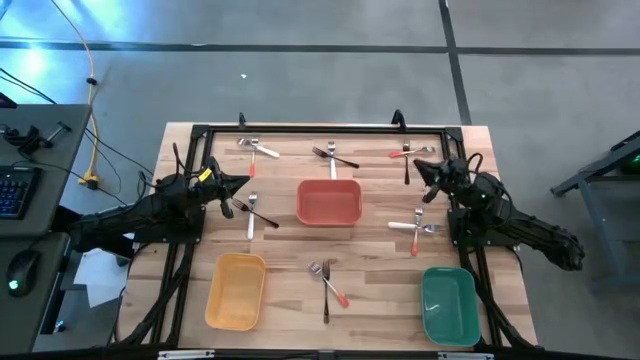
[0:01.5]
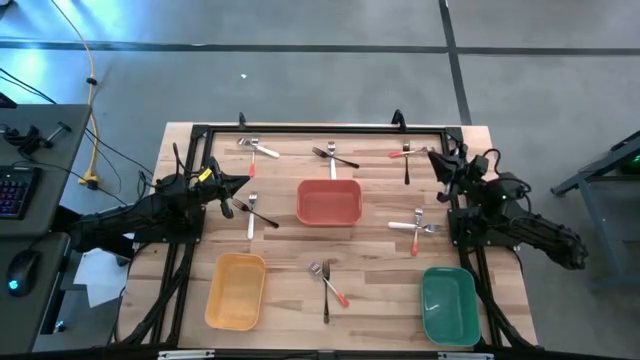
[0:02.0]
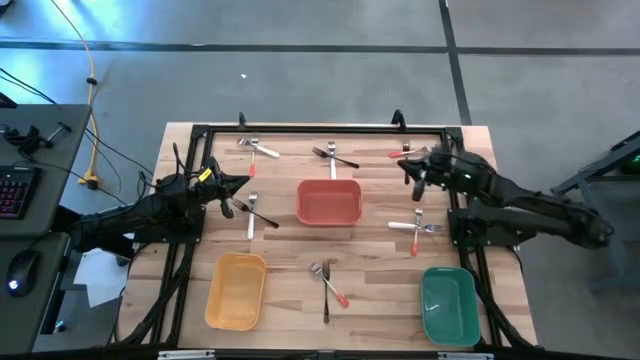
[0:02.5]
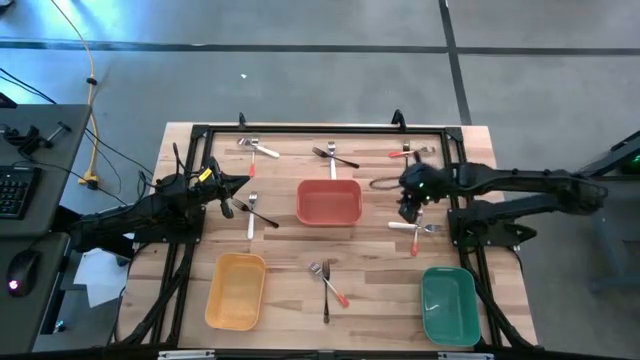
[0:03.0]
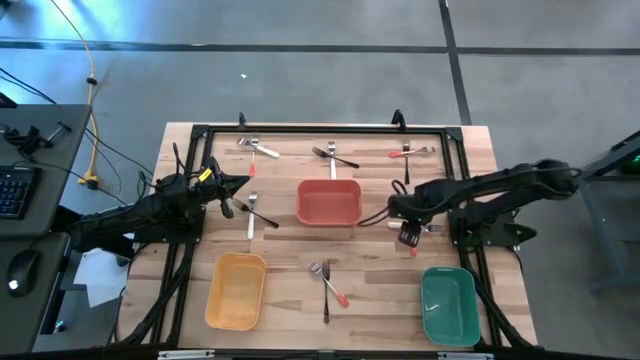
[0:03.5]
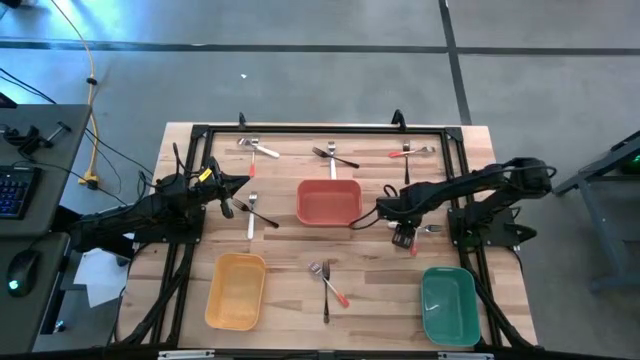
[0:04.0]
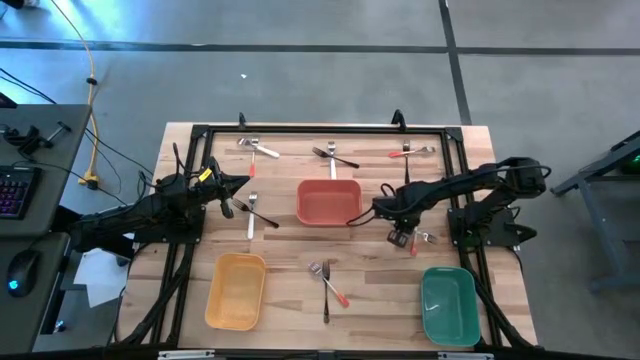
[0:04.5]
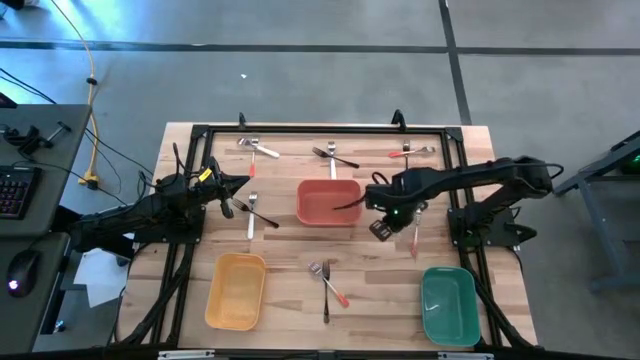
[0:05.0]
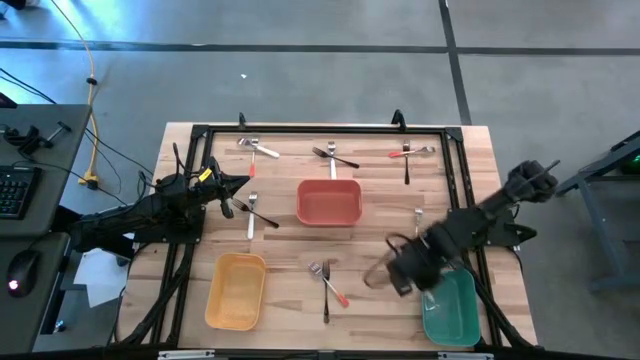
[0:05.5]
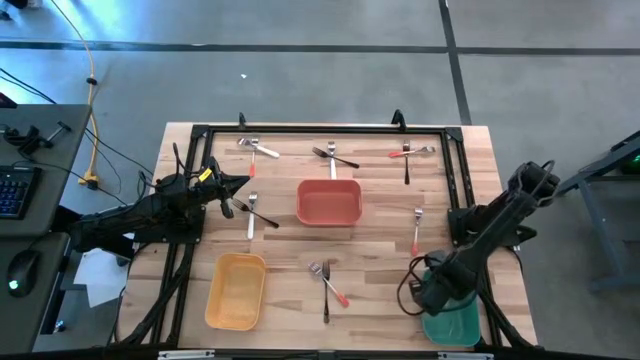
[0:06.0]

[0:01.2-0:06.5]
Task: Sort silverware by color (type)
Put the bottom right white fork into the green bin

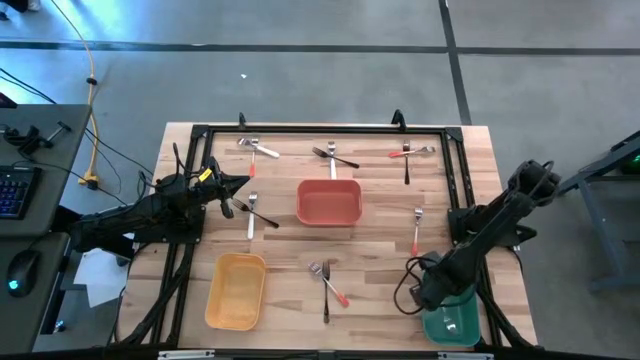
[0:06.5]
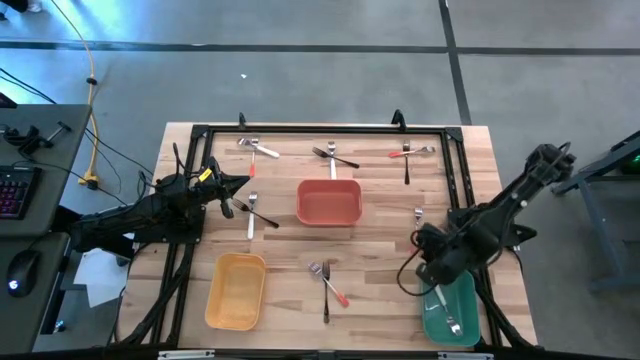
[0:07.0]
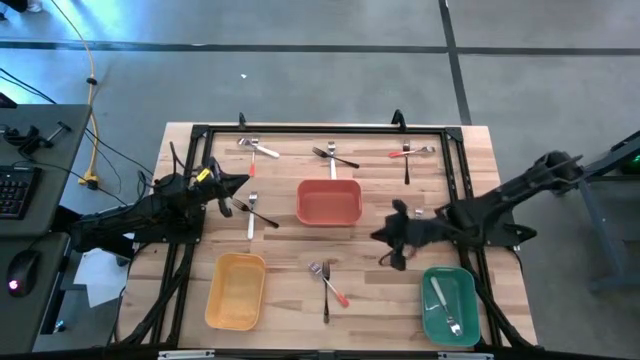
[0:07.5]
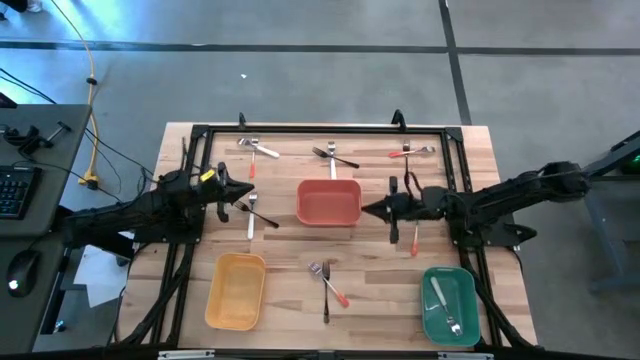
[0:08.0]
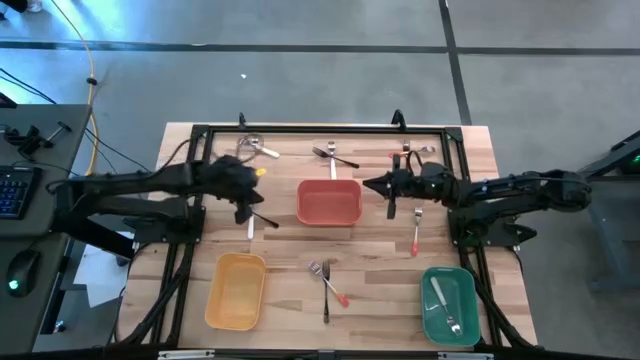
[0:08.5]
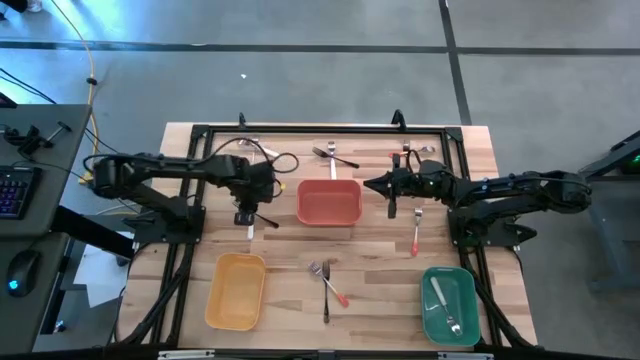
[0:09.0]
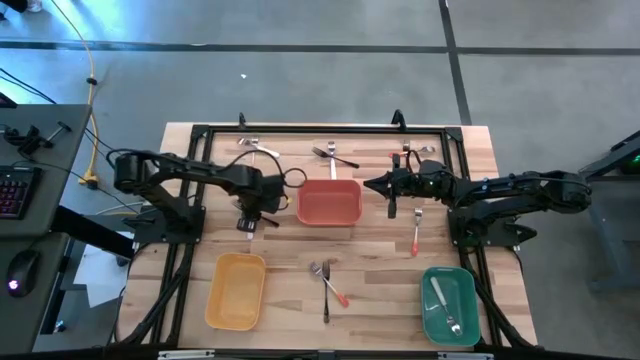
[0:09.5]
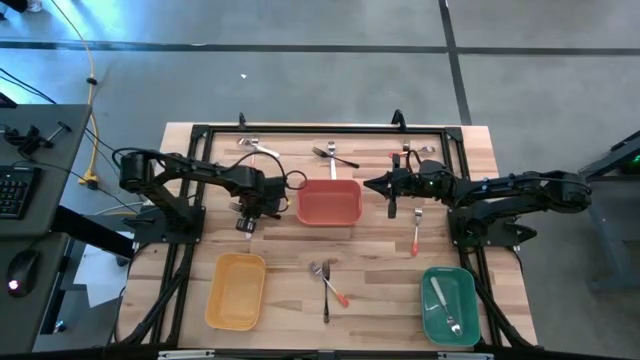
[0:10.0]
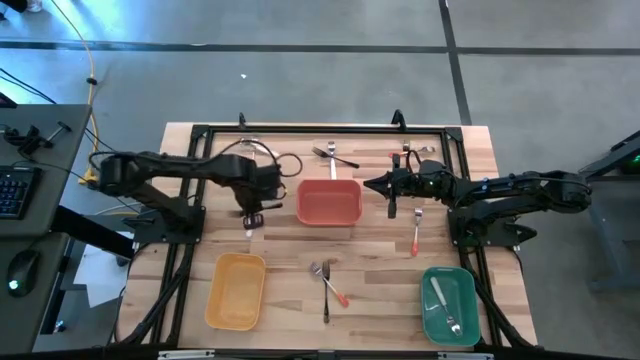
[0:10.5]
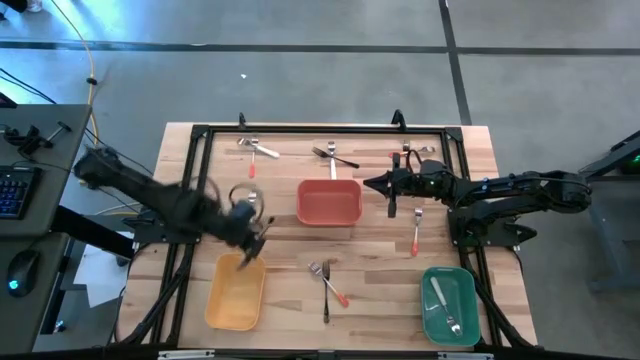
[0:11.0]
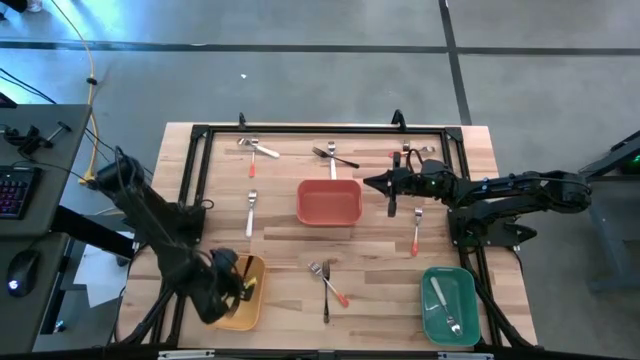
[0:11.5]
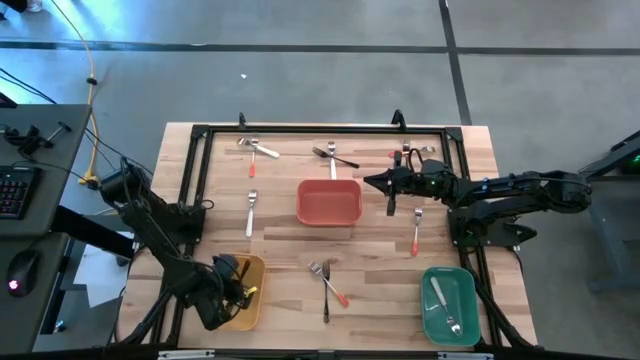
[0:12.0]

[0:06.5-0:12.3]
Put the middle left black fork into the yellow bin

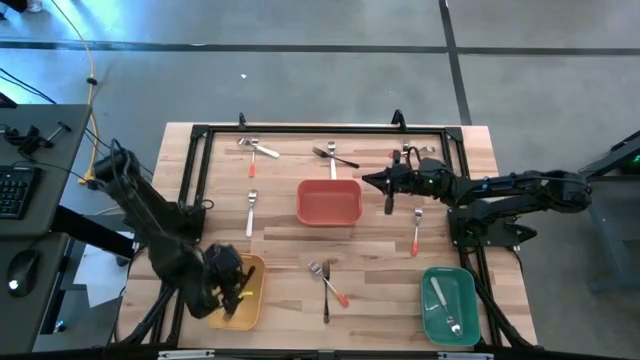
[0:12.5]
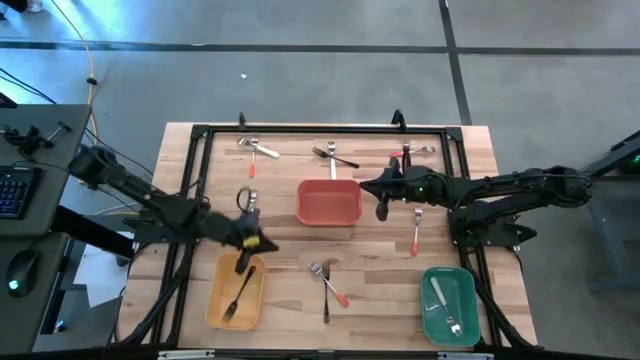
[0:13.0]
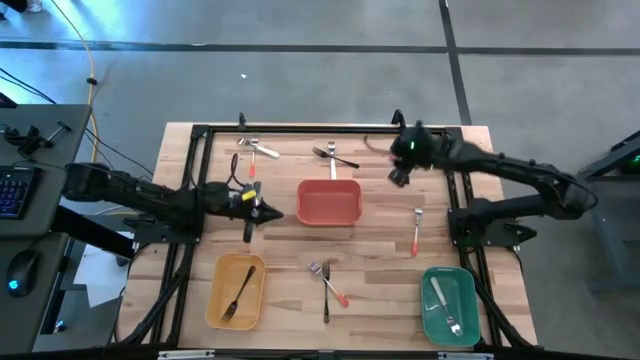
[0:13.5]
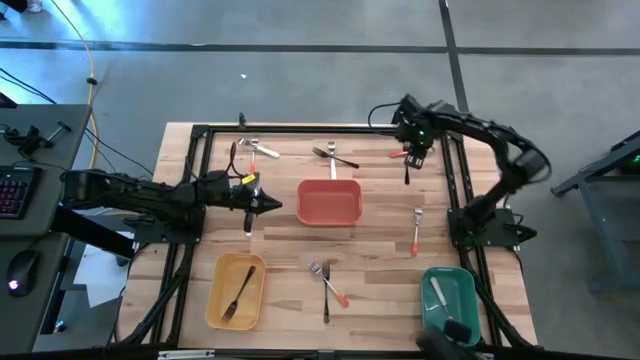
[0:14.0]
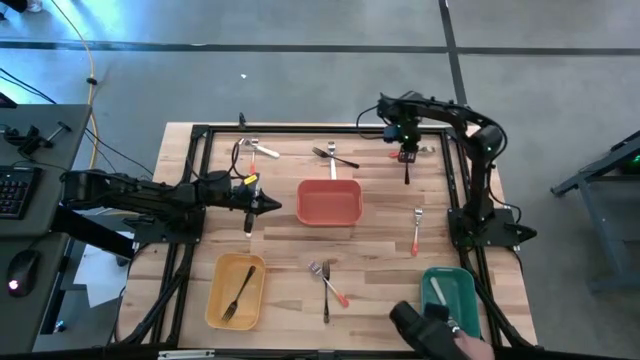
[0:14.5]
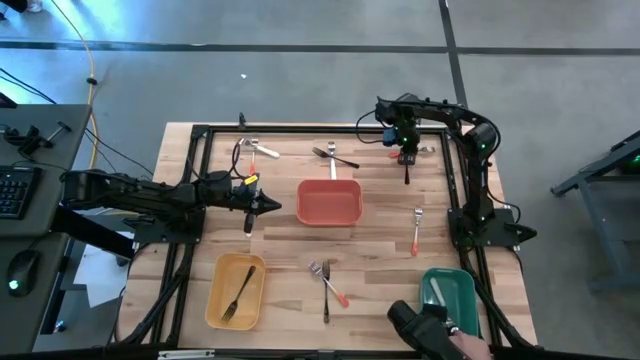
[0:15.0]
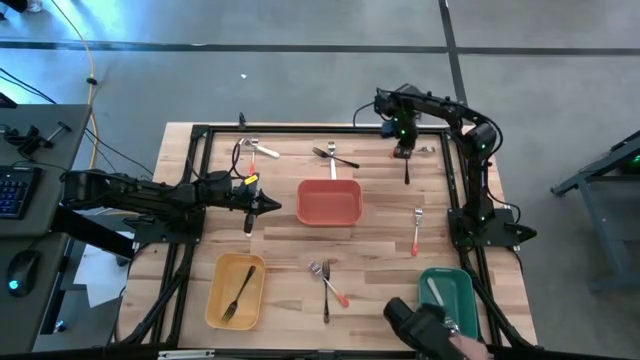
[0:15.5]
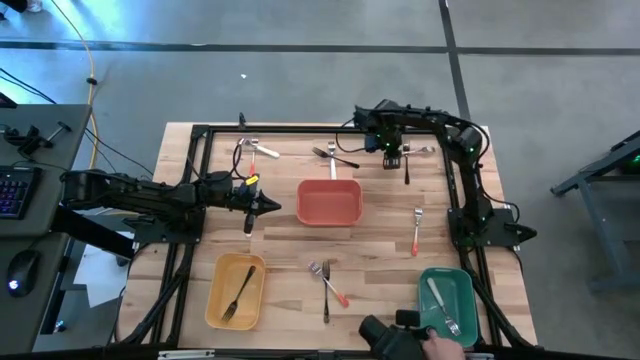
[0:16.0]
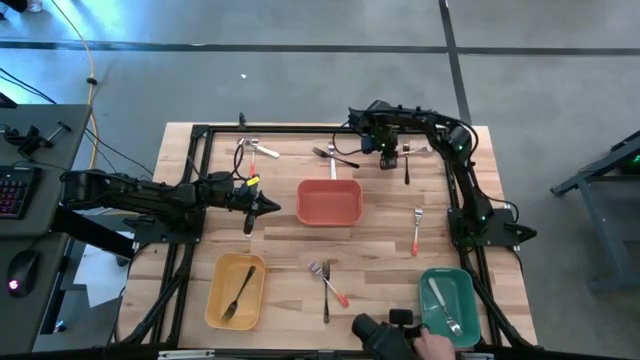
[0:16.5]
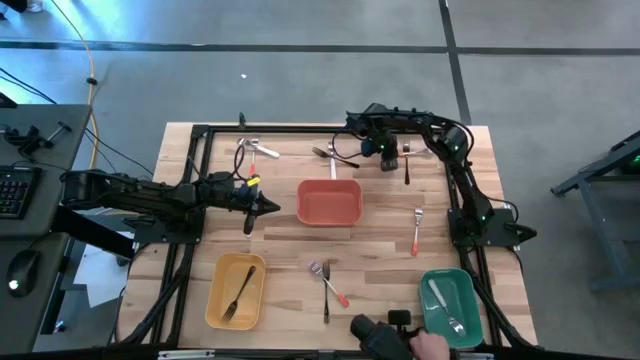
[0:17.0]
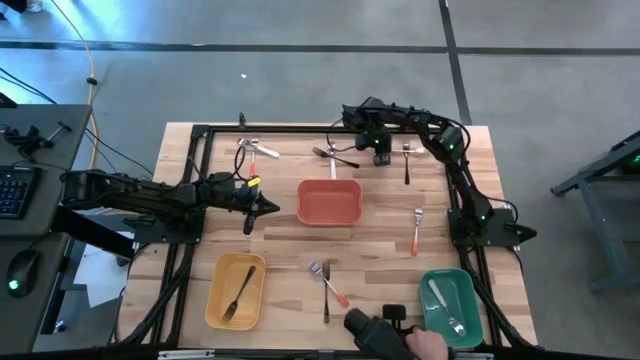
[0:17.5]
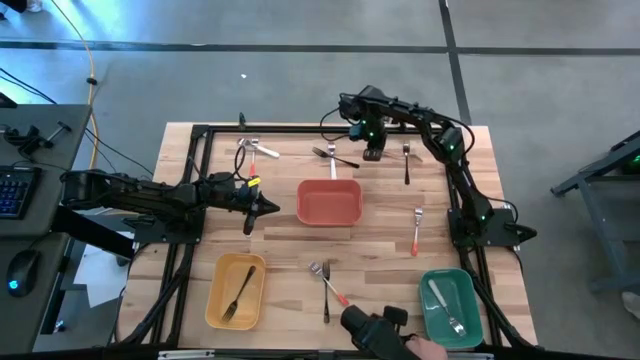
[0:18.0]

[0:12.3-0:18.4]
Put the top right orange fork into the orange bin

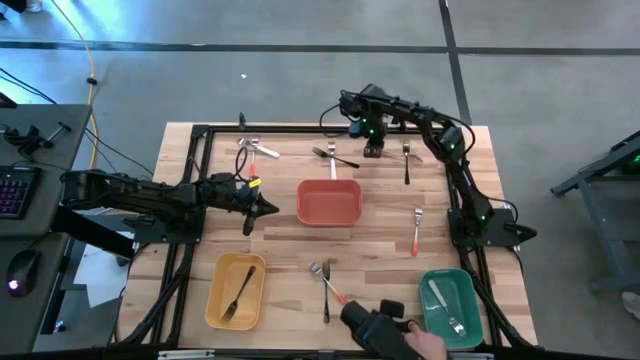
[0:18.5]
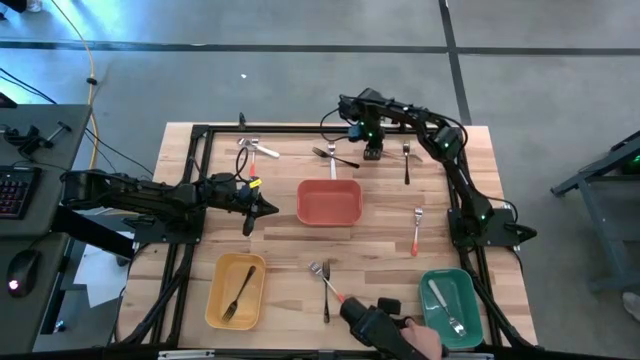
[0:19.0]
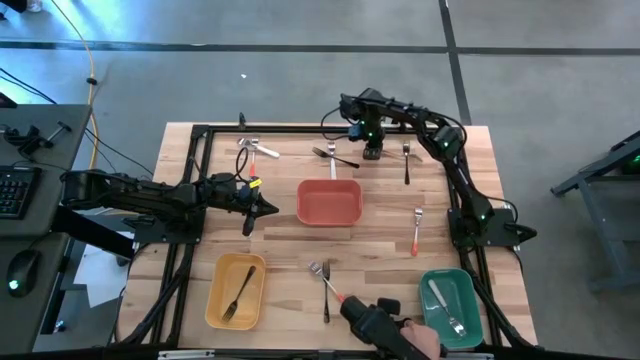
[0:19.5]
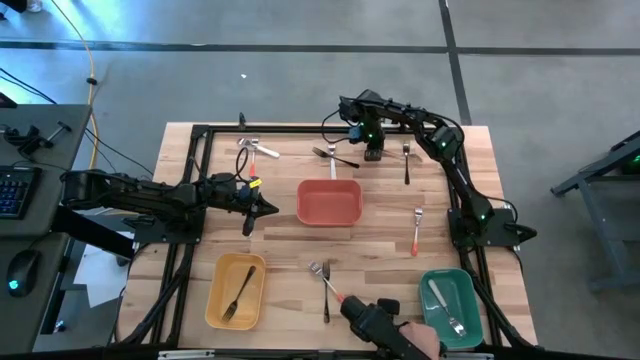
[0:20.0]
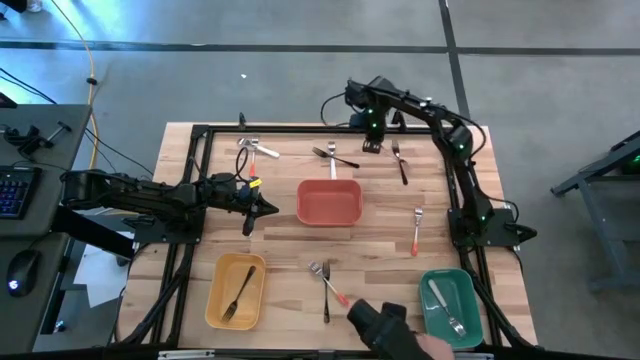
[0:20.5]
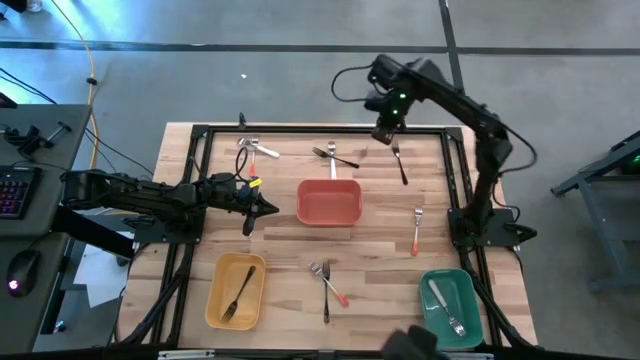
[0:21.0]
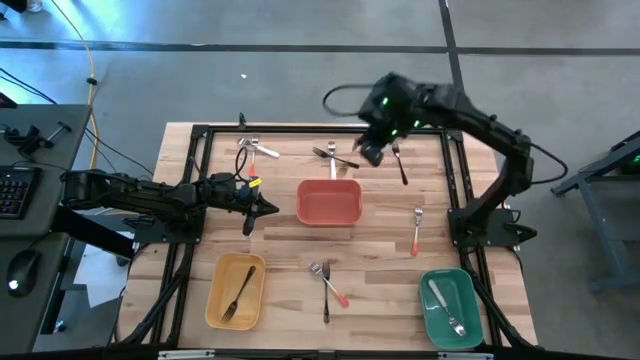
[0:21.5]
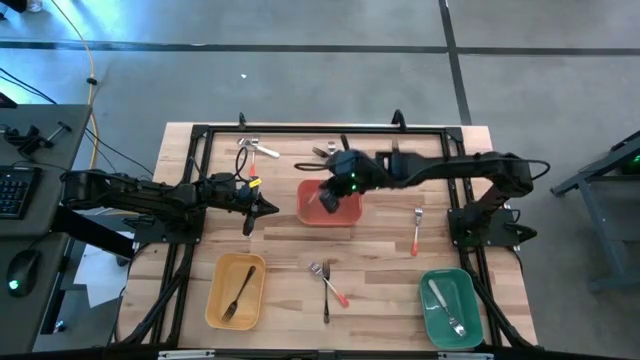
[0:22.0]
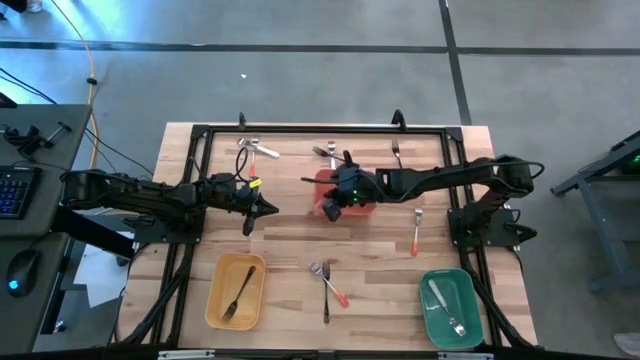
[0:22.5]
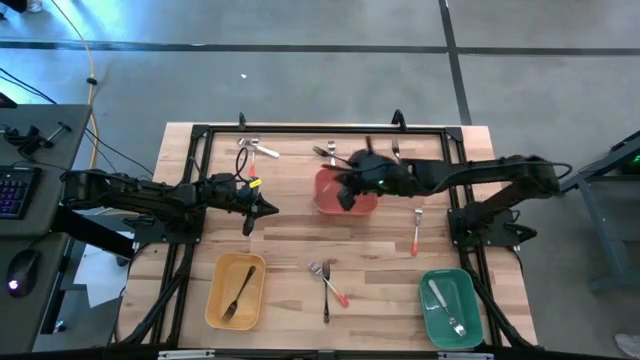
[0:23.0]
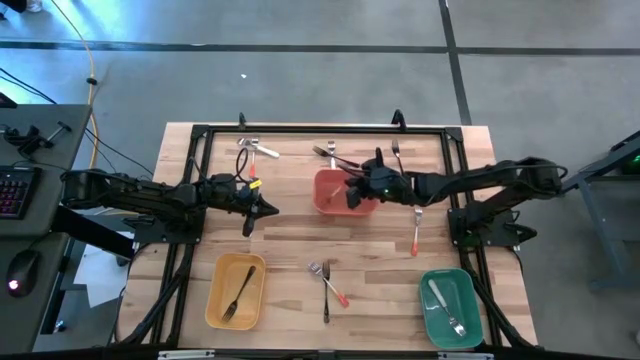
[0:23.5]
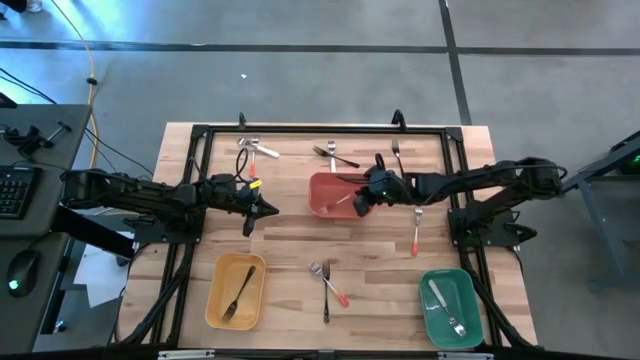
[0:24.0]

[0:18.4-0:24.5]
Put the top right orange fork into the orange bin
